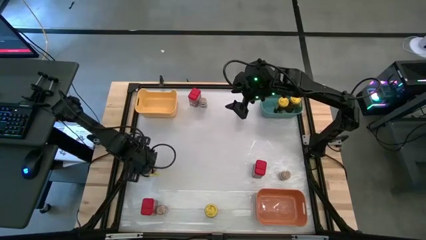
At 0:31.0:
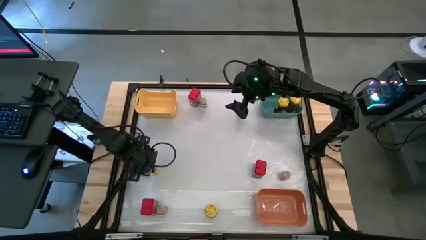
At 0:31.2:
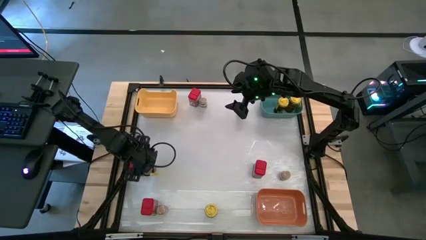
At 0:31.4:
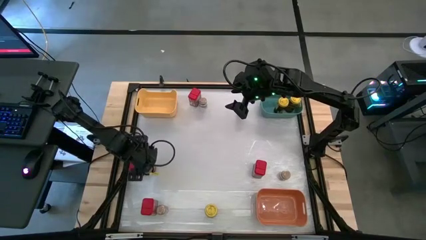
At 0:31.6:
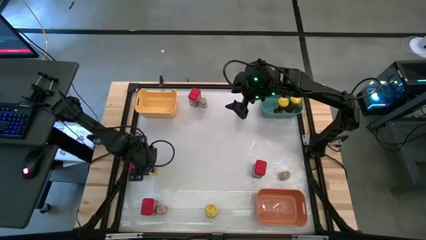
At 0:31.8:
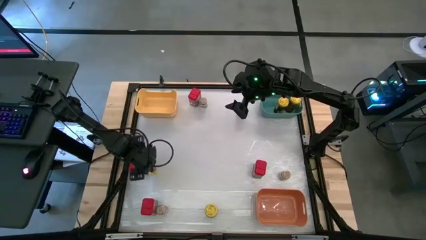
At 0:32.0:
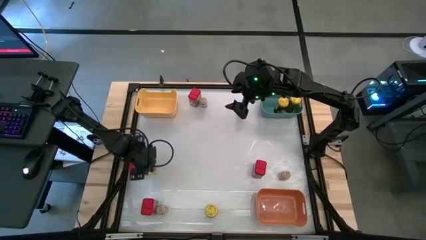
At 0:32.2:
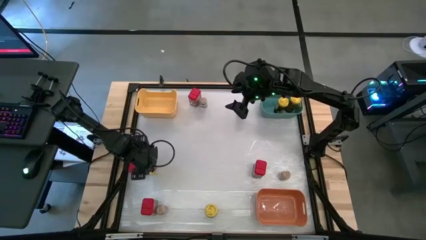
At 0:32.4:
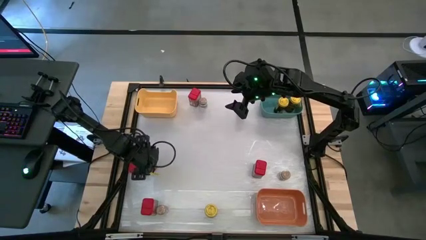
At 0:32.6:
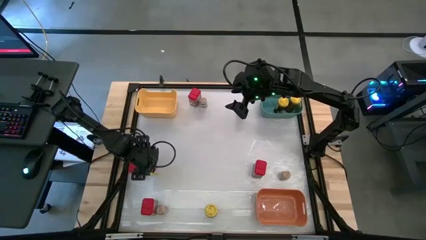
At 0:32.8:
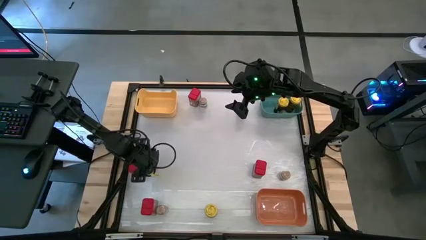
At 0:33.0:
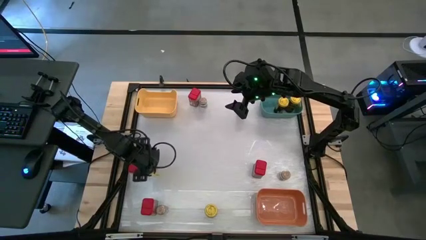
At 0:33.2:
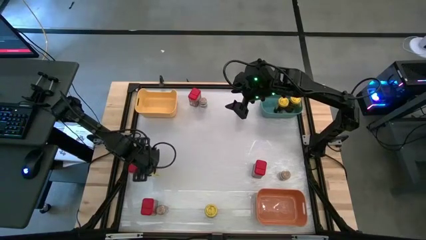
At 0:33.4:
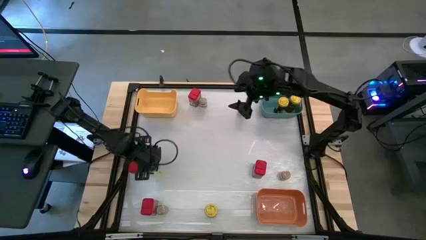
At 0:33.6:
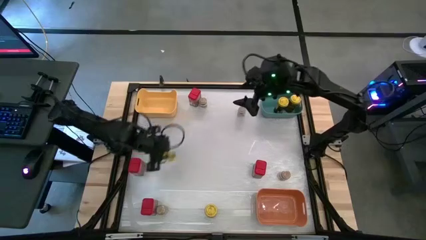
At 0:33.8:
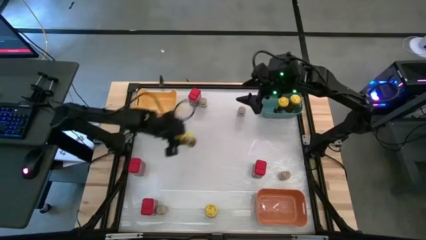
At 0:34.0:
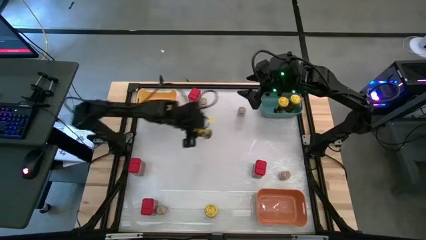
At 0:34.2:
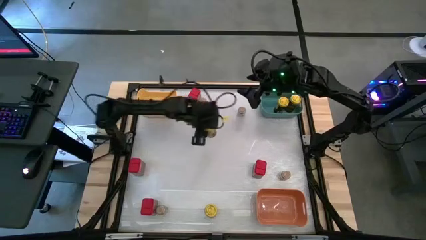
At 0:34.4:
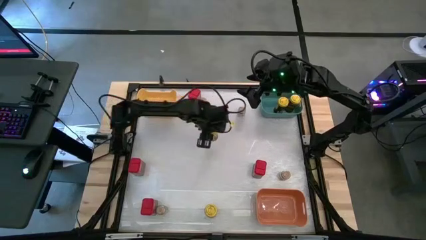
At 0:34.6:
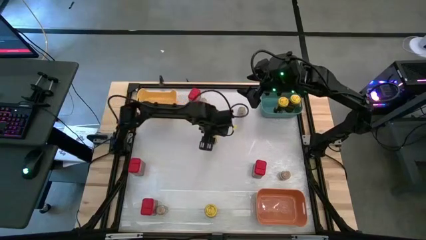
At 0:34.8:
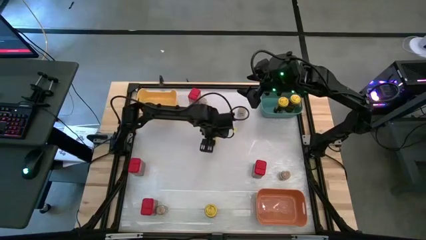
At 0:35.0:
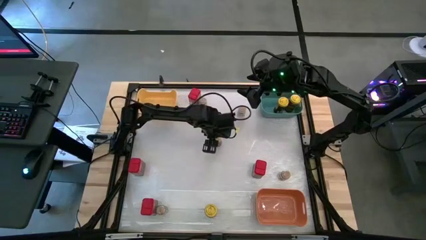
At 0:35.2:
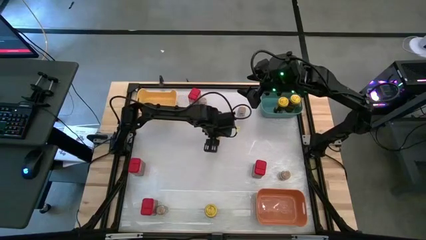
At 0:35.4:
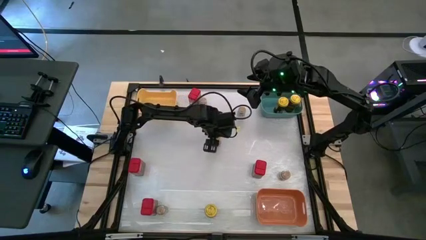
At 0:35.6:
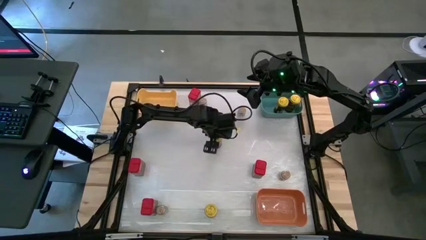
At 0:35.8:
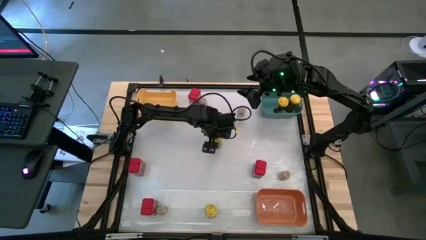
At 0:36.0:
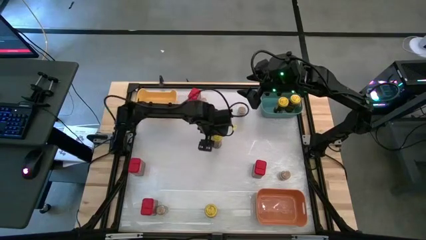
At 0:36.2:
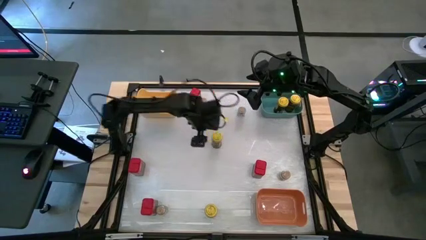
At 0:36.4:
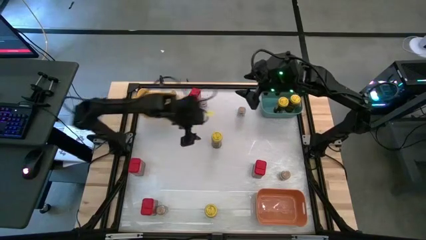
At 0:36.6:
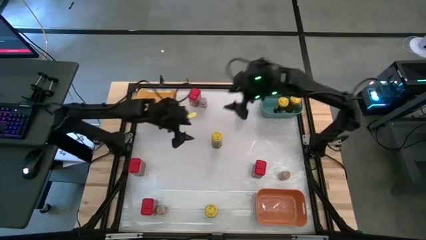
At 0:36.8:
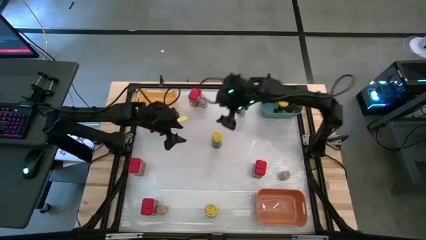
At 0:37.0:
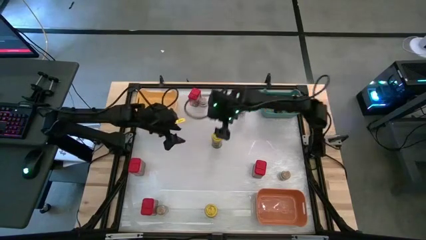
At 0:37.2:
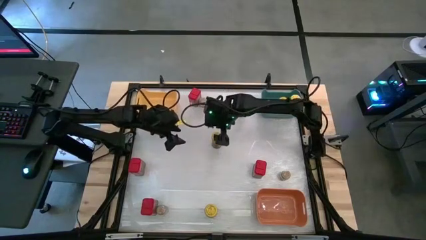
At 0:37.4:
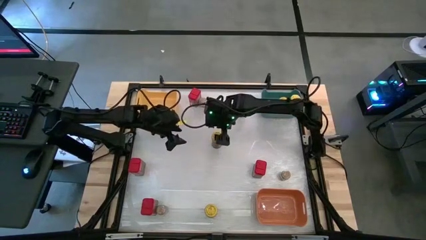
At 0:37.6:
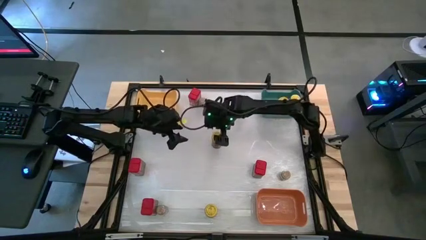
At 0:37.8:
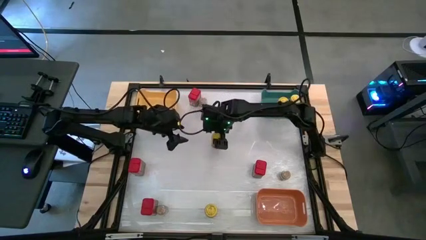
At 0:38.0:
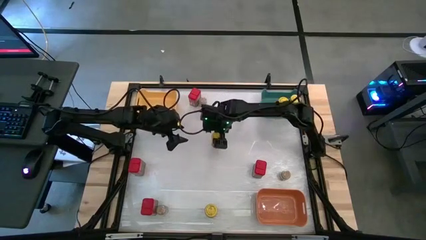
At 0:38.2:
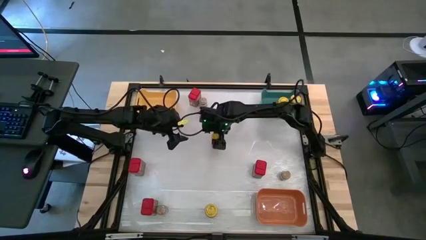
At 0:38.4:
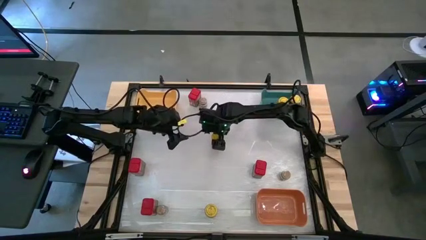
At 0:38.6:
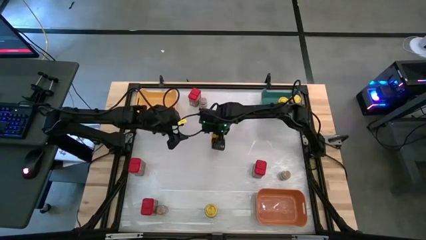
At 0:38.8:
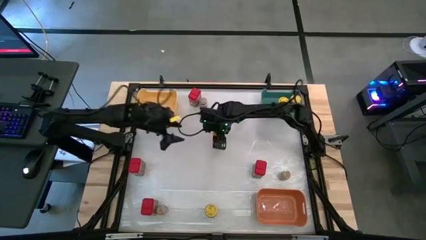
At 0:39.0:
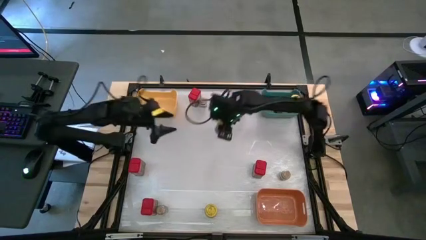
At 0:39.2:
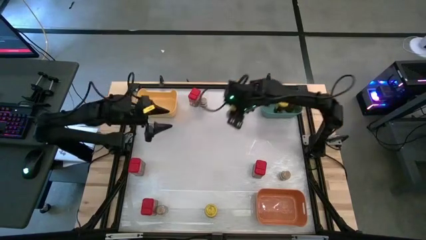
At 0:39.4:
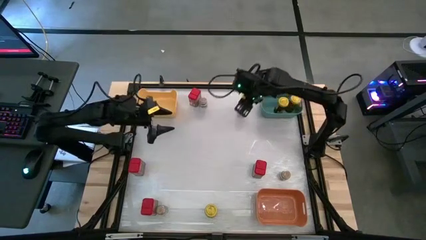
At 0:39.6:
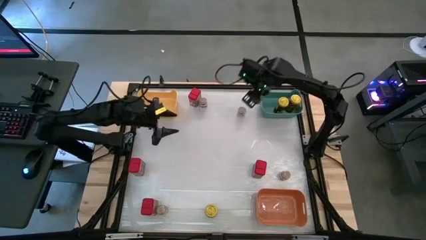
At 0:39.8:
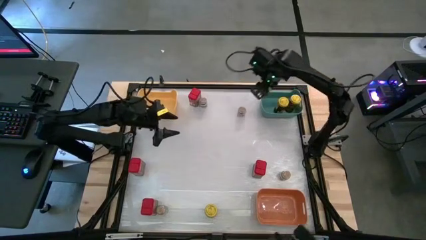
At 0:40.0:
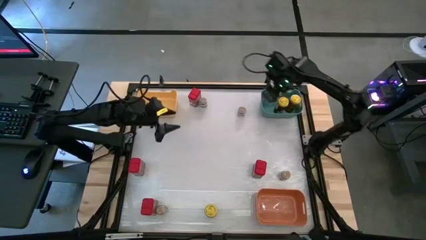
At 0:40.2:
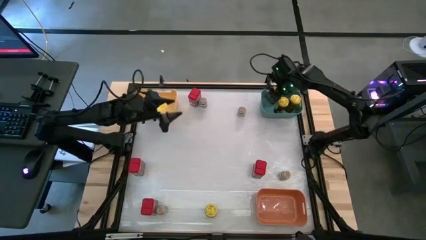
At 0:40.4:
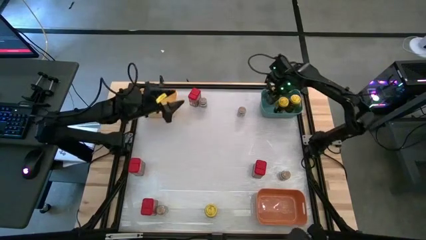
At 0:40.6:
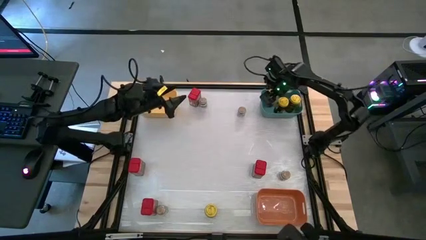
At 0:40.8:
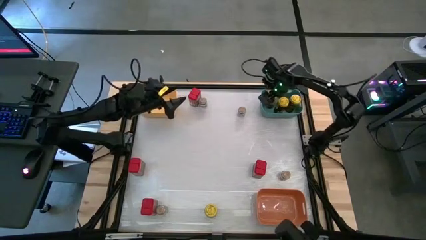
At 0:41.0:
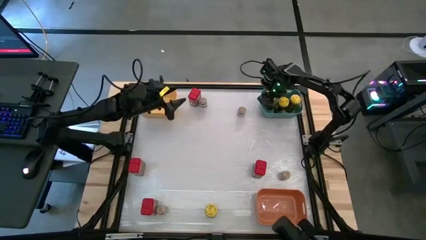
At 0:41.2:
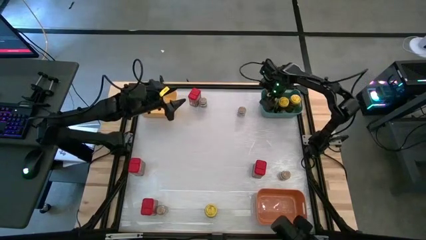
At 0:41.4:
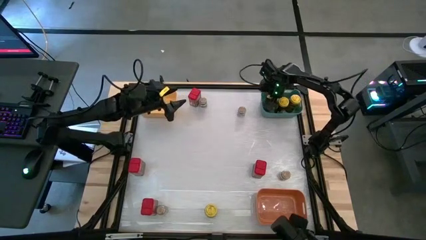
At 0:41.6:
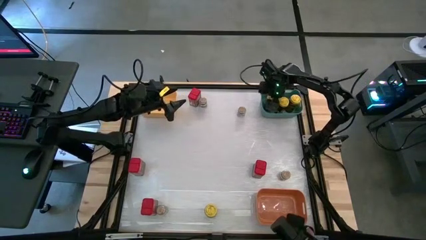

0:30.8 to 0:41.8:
Task: Sort spices by type
Put the left yellow seasoning bottle into the green bin

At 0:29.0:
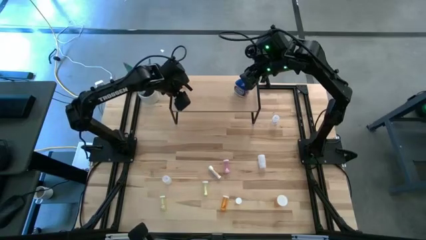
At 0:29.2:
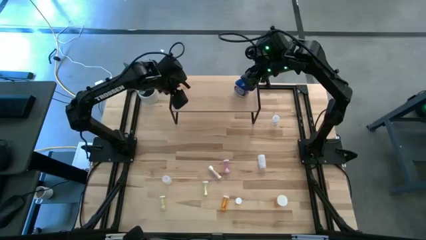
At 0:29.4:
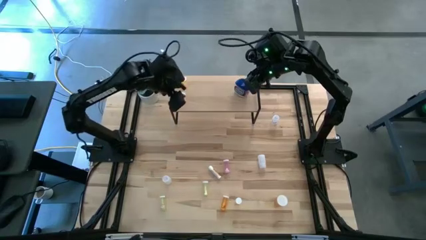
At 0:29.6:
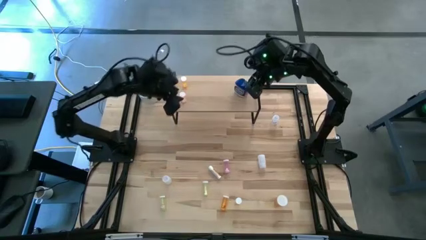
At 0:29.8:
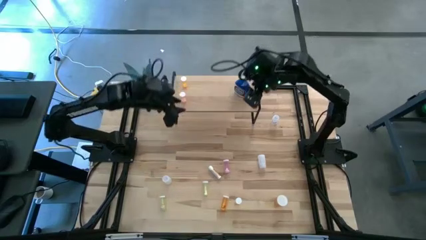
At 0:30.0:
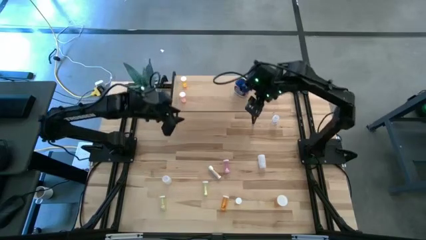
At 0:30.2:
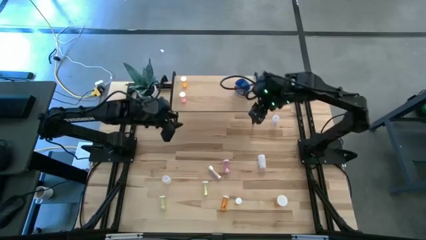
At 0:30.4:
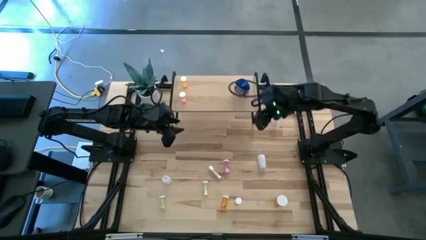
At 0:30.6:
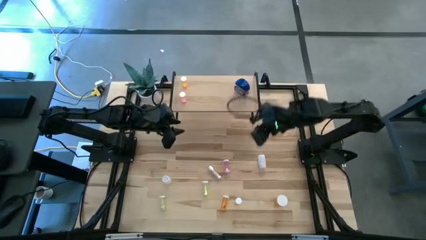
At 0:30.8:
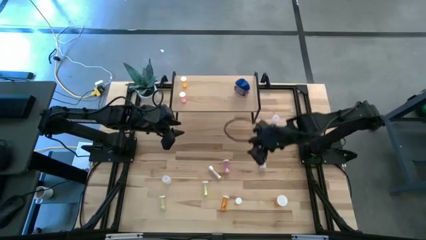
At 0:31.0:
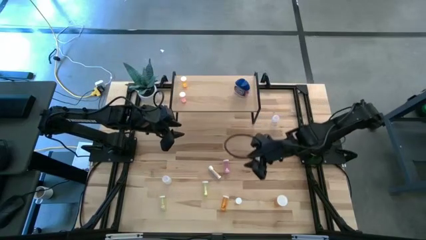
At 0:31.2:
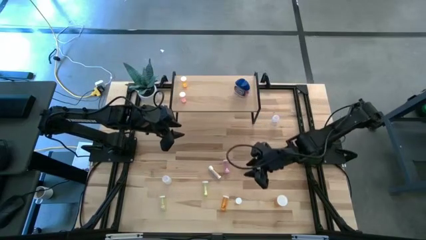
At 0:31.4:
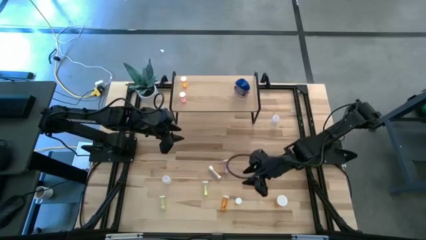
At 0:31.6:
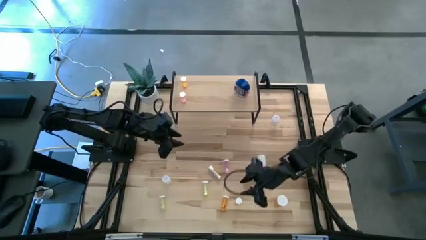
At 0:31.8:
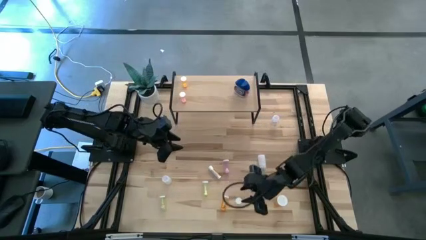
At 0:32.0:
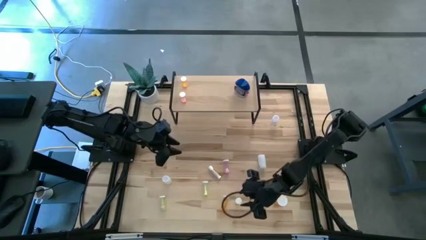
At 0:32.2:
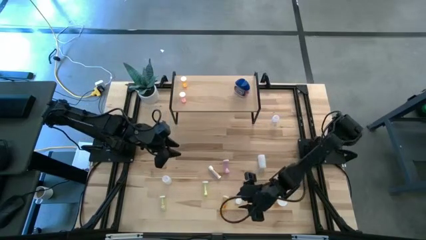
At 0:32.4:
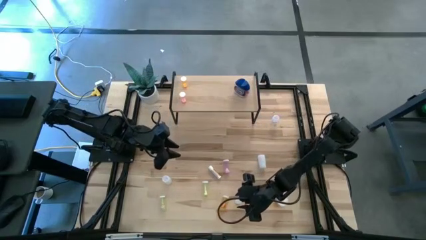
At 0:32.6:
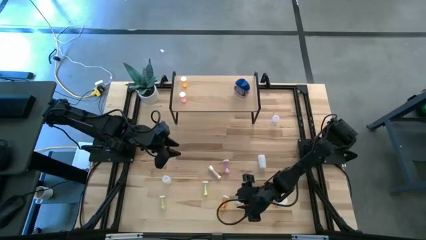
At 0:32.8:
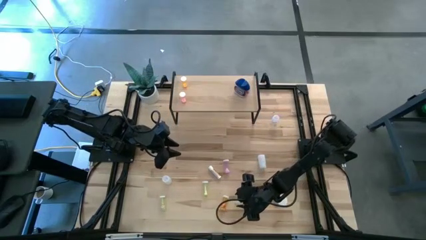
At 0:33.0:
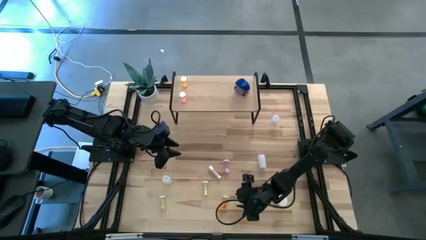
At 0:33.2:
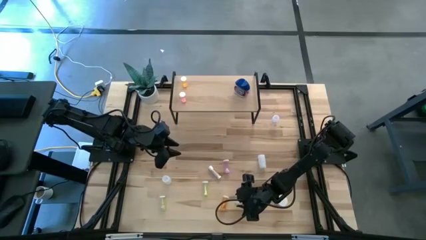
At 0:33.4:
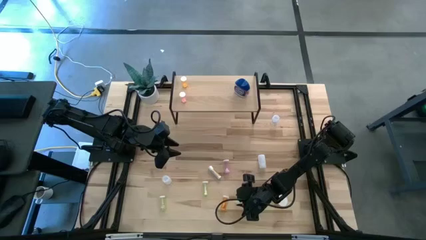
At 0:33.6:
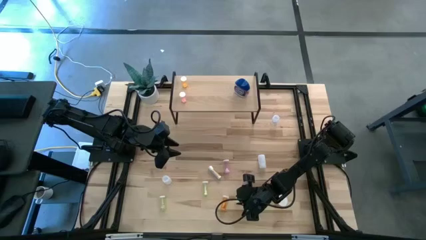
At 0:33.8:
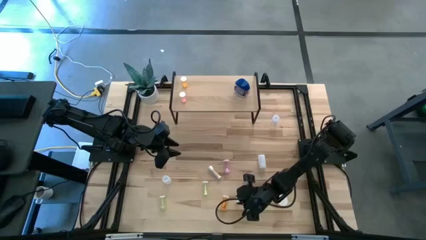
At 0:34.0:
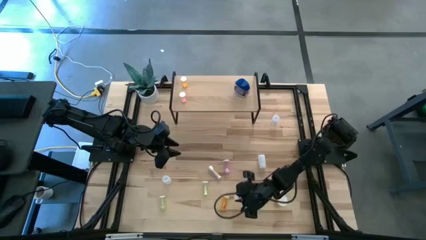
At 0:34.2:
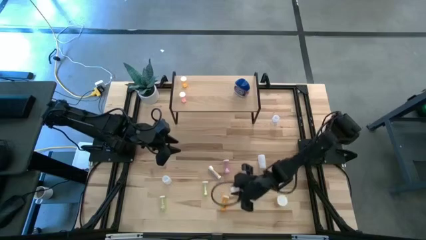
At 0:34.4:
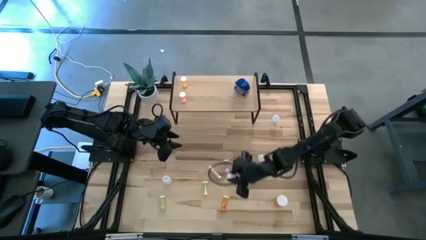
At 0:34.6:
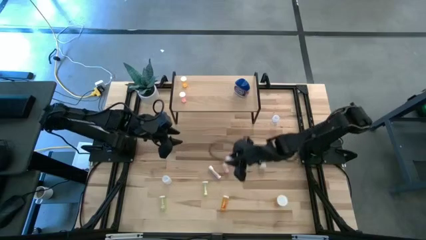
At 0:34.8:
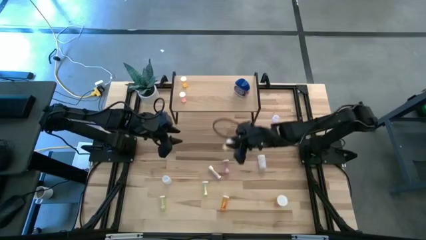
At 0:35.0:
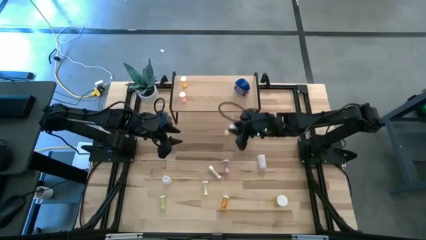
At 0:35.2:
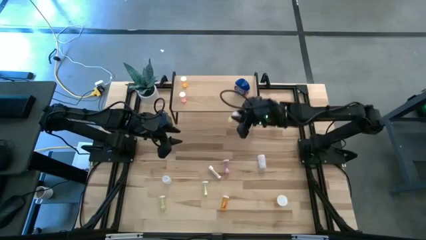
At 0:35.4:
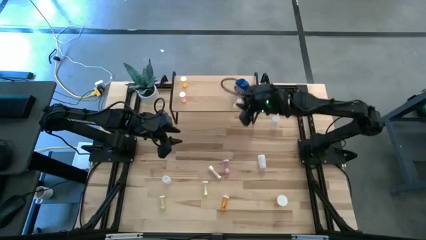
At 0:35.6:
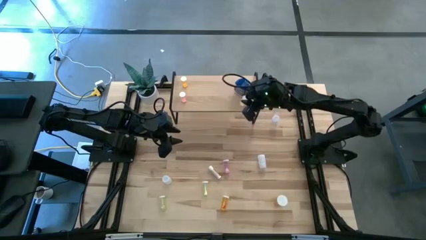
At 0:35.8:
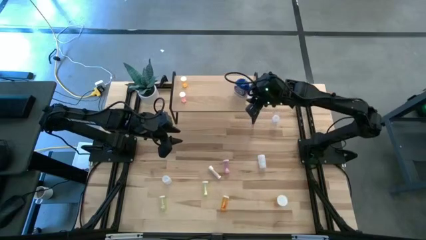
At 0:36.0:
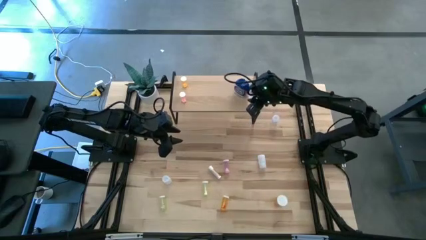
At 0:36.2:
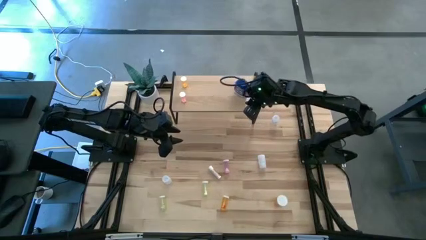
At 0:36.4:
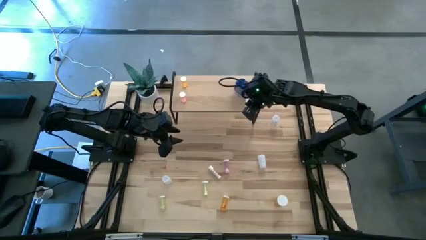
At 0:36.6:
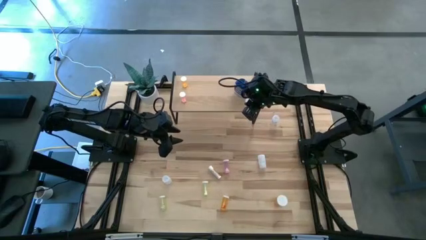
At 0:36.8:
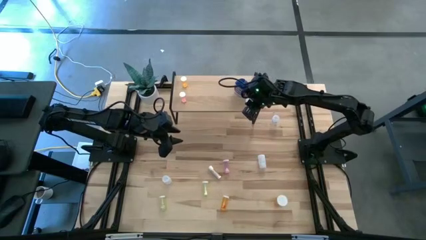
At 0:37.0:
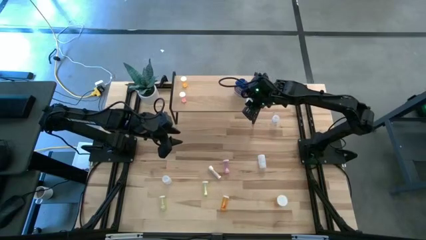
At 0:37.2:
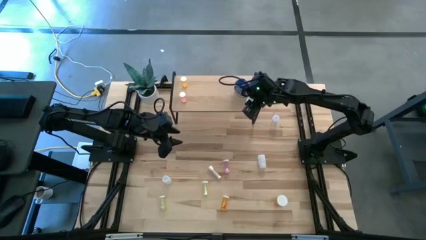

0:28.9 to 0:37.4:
Task: Pick and place medicine bottles onto shelf by color
Put the right yellow pill bottle on the shelf
